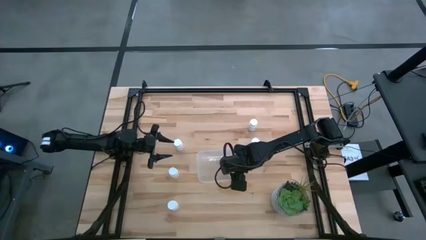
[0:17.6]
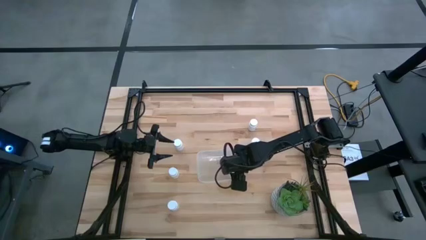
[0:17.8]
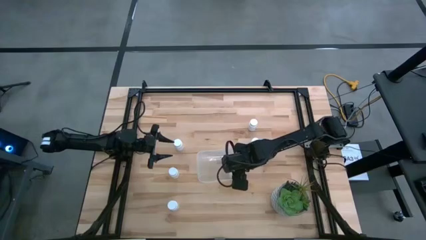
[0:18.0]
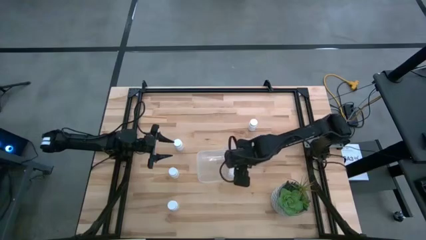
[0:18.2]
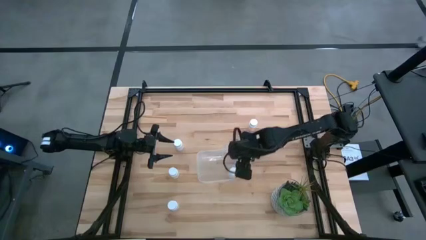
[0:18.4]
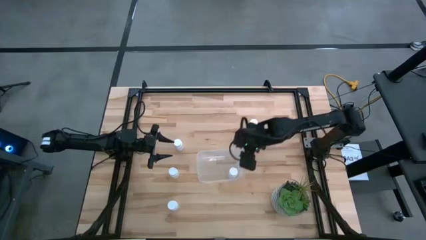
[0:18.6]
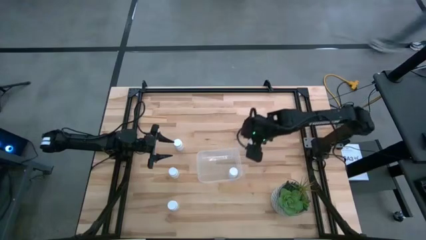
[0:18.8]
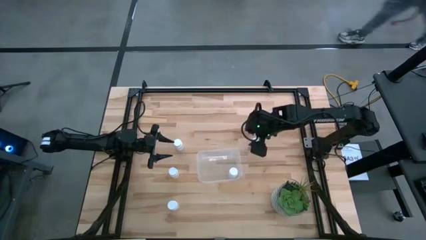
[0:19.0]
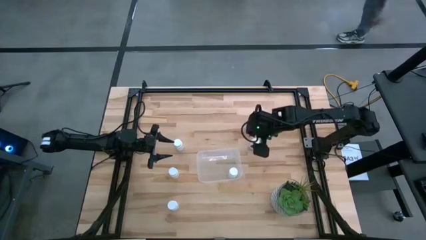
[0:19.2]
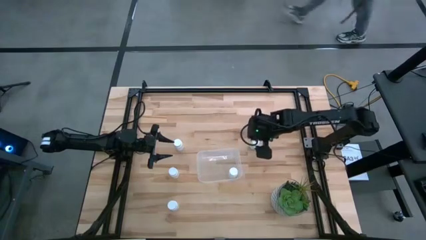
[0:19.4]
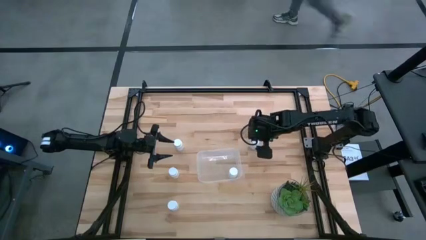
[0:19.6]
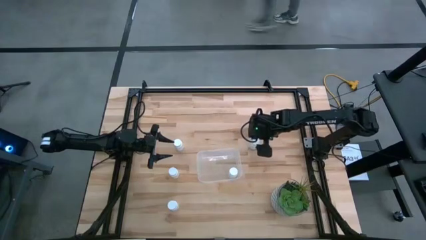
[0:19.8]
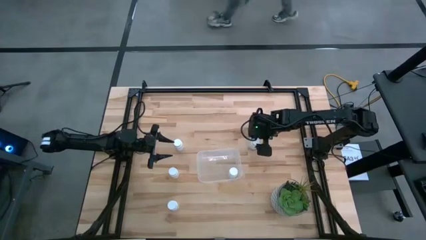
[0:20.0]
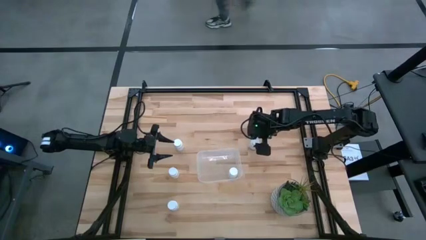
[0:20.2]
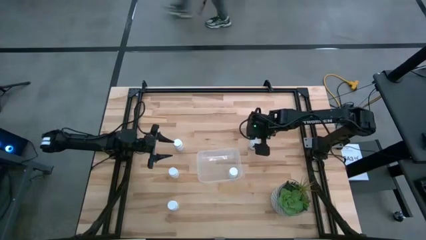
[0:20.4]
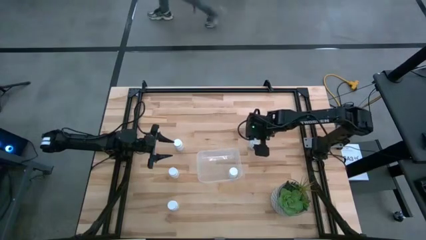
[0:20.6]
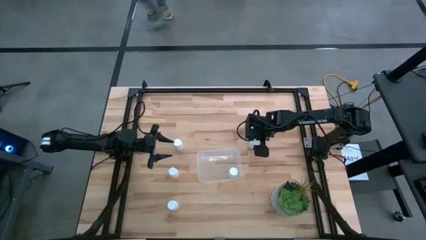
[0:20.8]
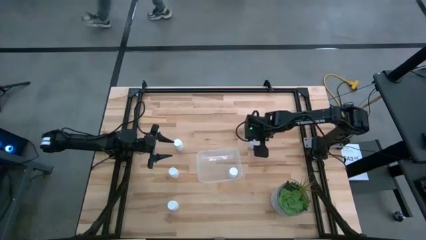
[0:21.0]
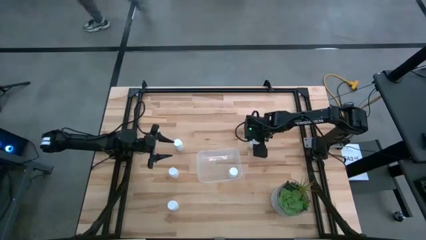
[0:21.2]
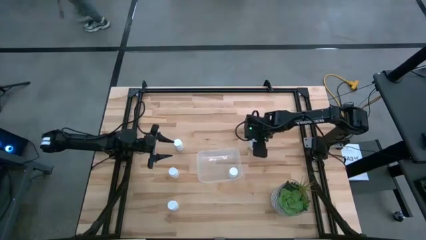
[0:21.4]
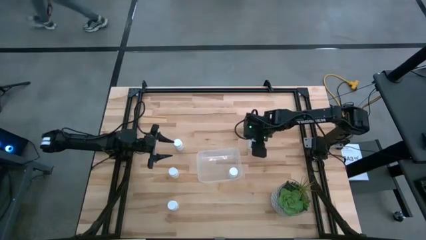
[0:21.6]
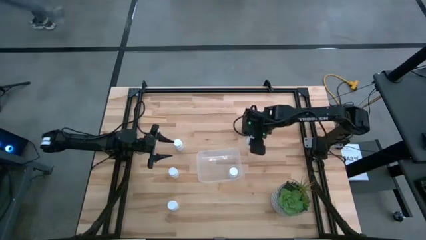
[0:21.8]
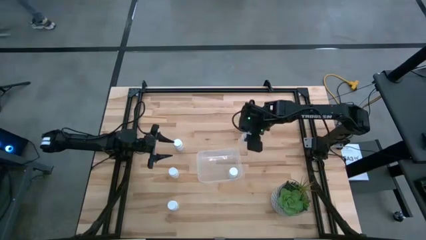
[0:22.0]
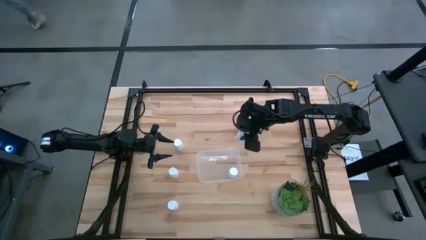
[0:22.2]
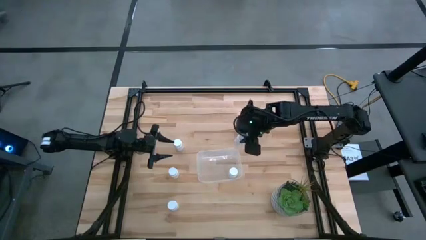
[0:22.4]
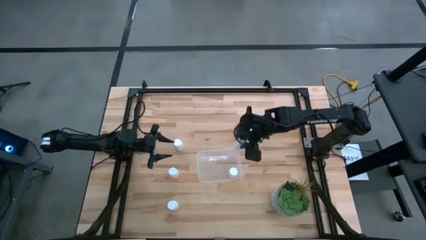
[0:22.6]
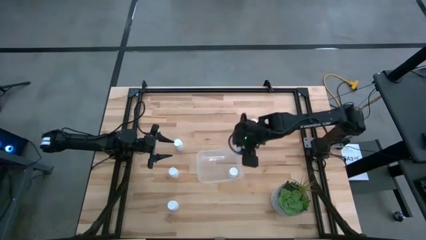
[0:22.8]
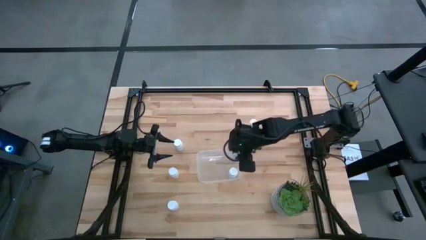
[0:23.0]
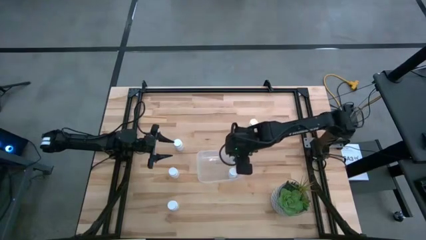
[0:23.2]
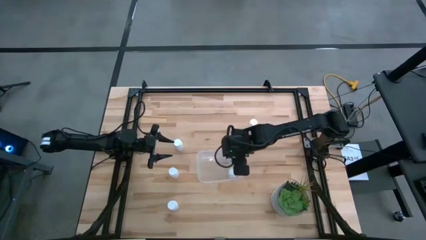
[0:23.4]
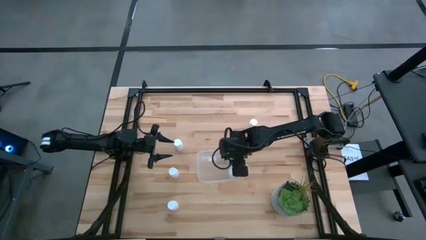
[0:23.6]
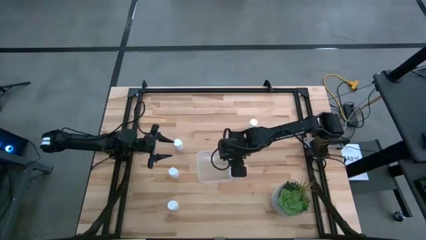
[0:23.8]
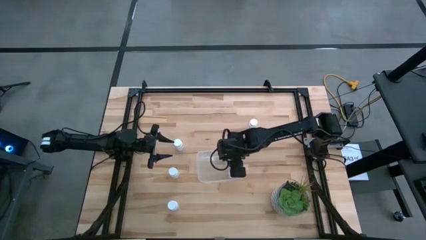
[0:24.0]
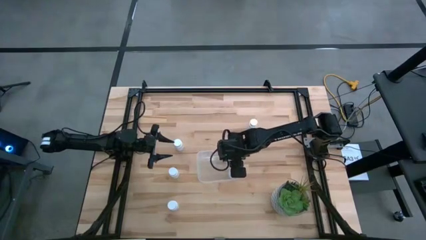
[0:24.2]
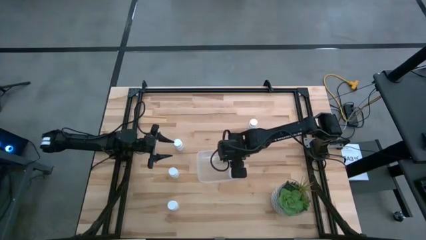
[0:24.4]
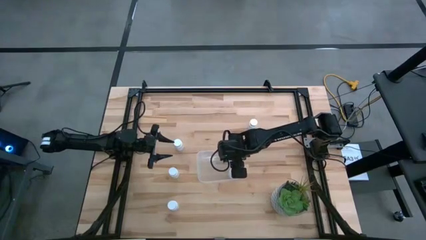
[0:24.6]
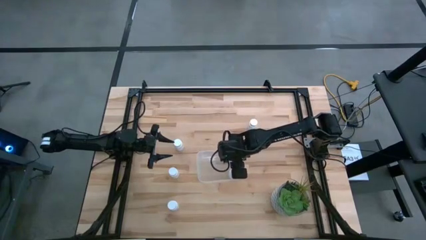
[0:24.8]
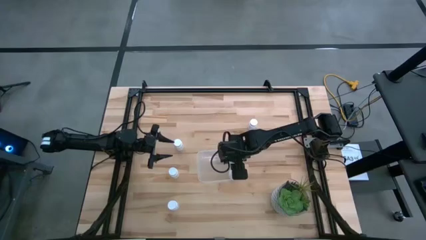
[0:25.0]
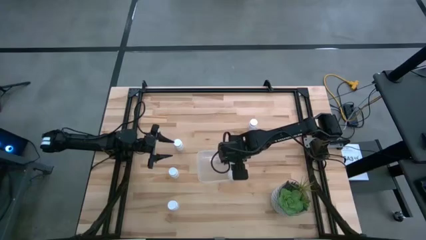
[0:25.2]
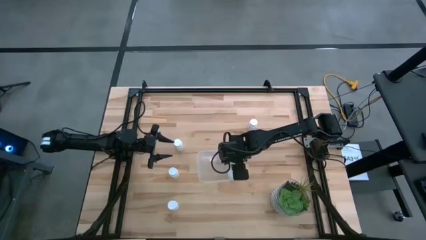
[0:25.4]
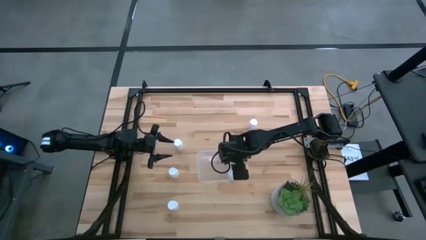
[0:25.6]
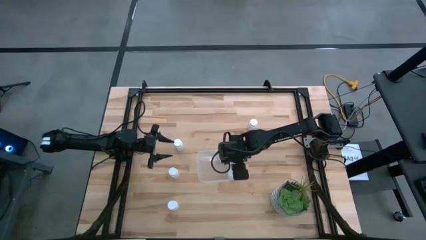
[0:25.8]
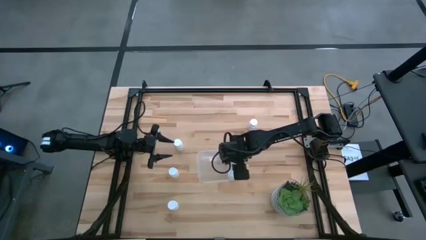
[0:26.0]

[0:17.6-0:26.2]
Task: Pick and place pill bottles into a basket
Put the white medicine bottle into the transparent bin

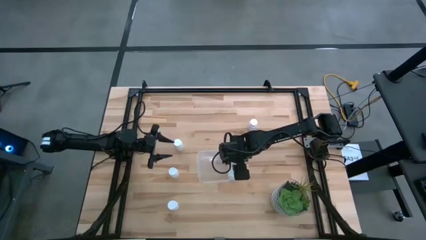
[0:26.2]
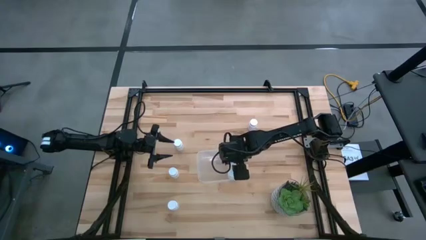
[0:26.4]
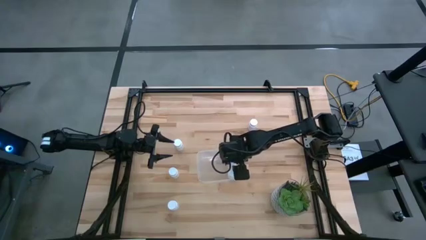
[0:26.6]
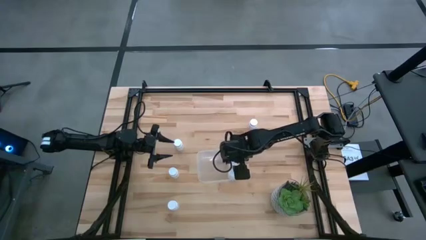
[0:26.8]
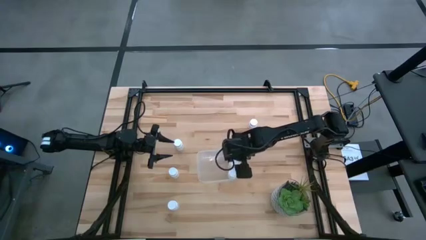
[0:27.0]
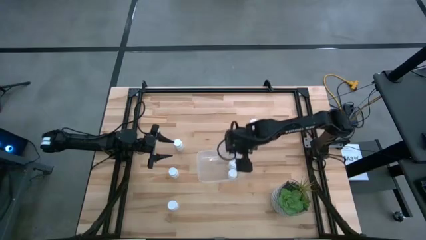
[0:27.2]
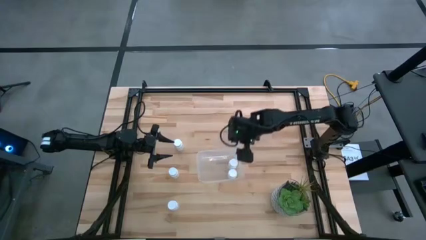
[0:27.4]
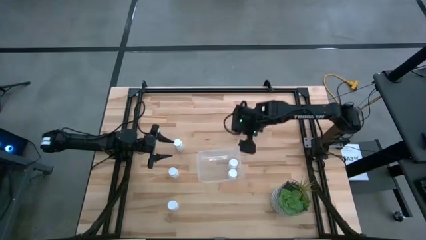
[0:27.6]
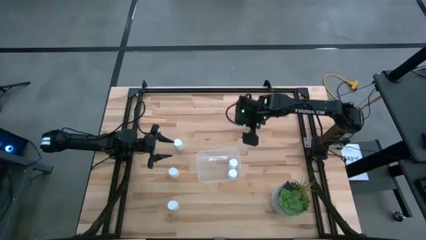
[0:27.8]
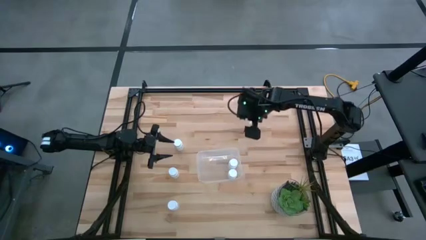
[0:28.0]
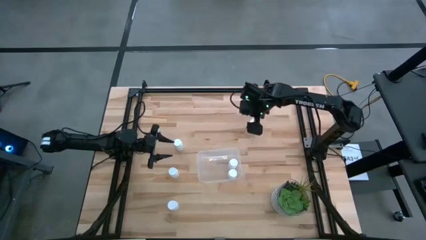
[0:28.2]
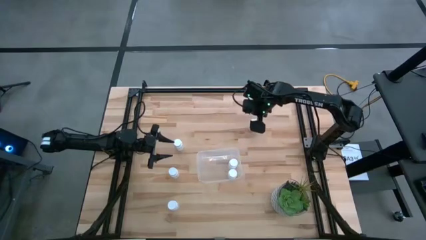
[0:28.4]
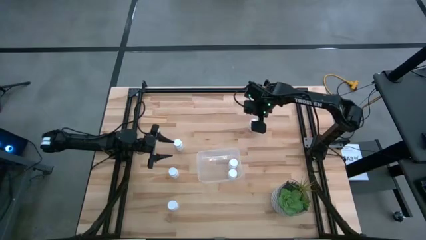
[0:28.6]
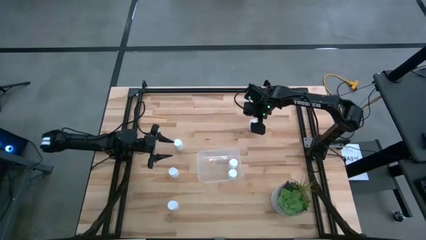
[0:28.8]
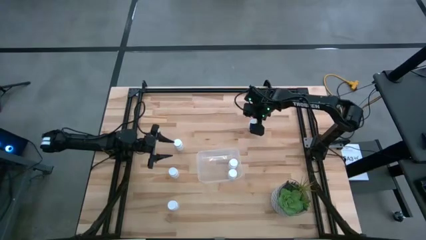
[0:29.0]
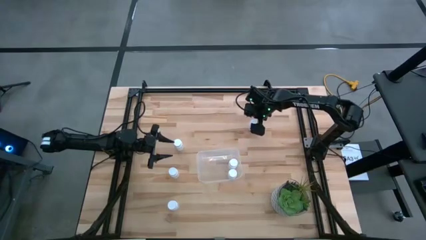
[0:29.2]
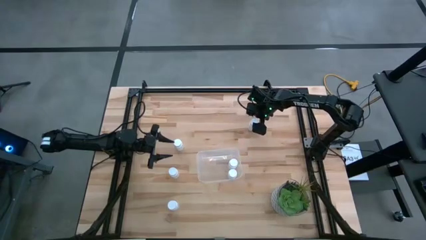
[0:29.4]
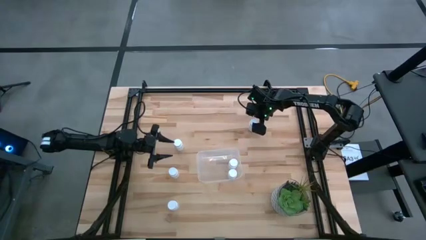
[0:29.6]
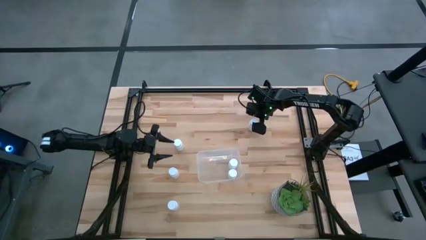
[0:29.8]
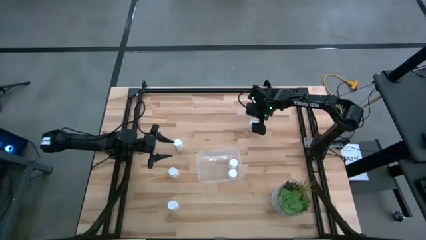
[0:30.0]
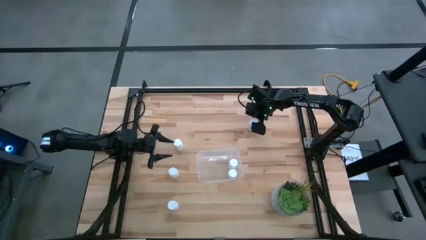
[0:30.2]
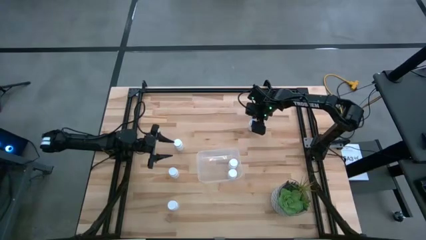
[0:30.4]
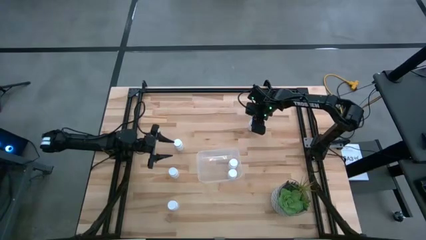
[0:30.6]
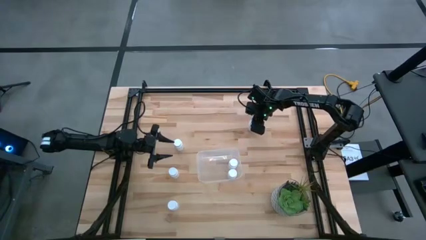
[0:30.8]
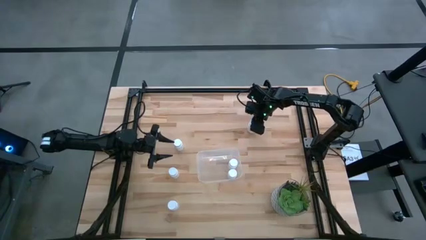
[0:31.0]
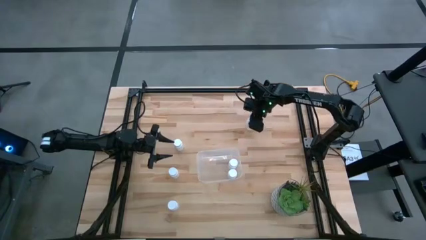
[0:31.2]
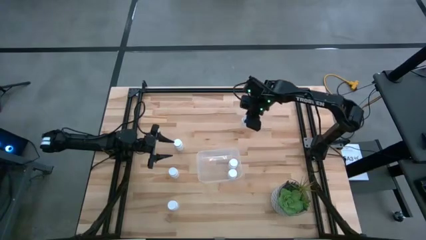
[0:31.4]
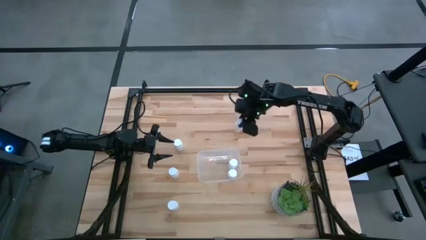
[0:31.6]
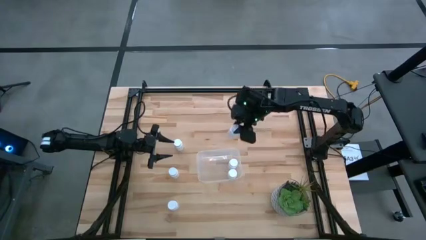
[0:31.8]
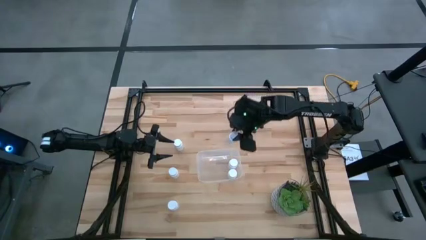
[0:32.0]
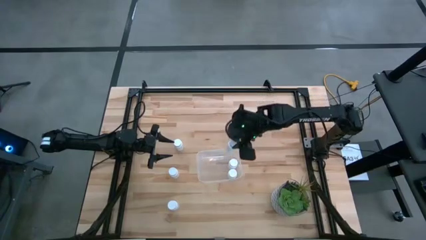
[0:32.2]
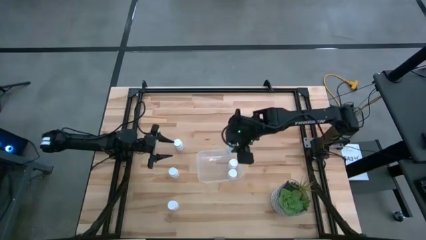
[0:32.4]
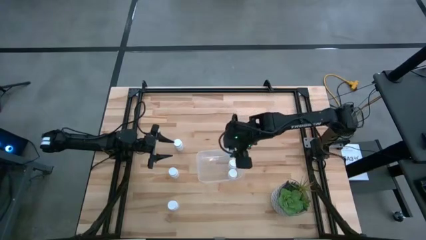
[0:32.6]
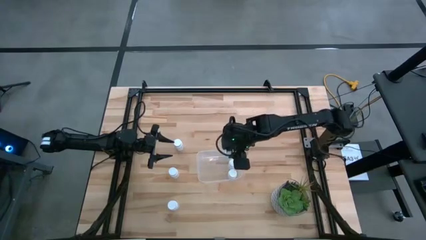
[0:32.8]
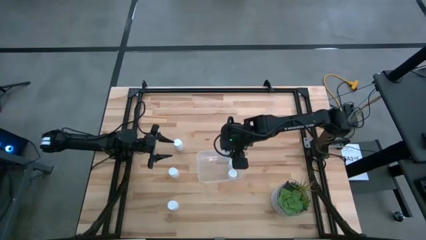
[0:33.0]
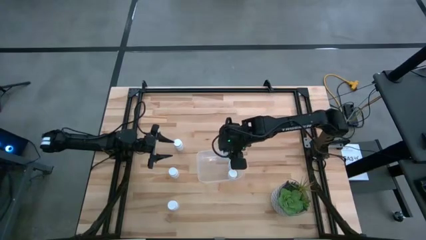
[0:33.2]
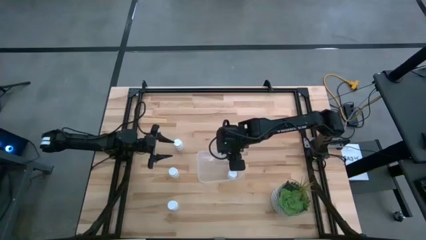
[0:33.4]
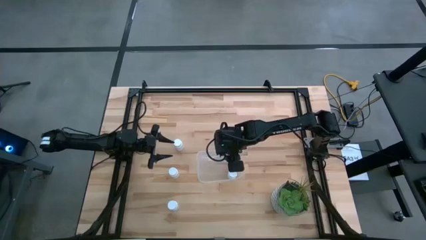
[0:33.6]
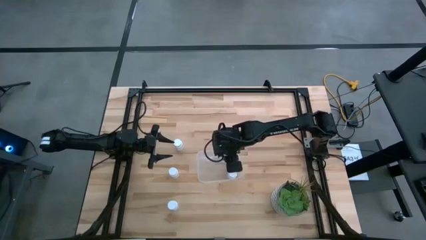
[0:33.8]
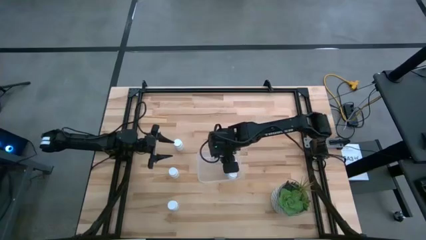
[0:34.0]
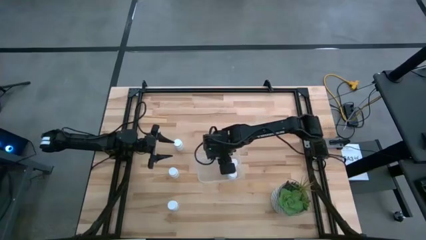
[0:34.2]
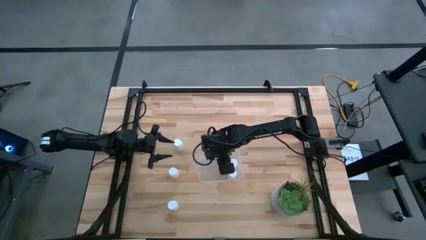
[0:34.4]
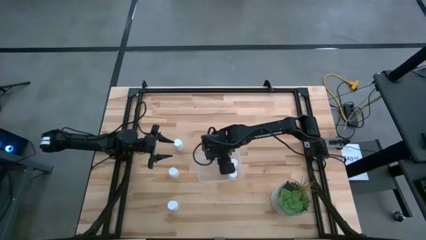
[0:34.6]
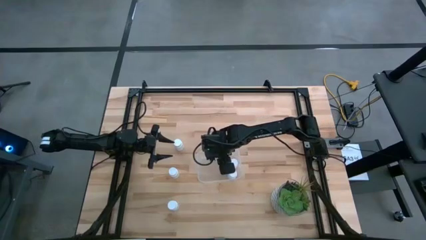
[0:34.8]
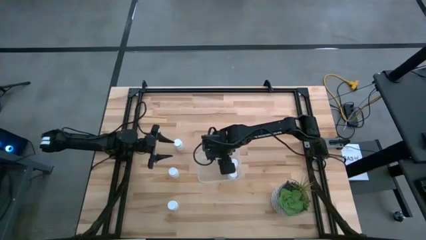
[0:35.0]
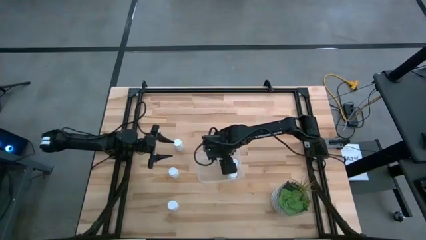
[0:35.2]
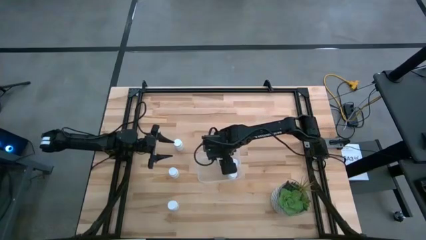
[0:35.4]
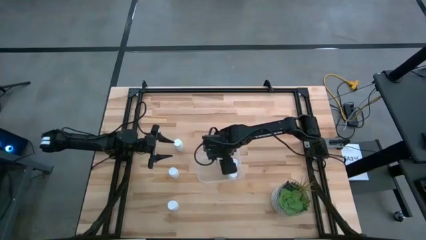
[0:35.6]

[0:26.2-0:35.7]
Put the white medicine bottle into the transparent bin
